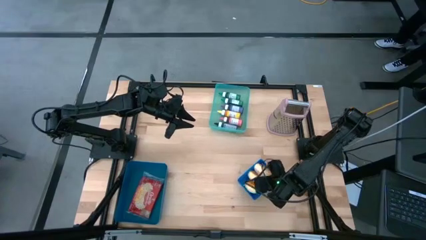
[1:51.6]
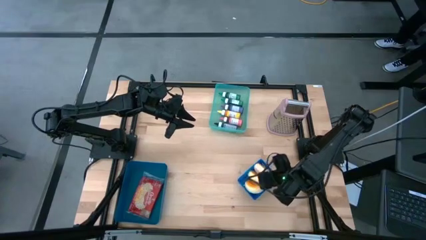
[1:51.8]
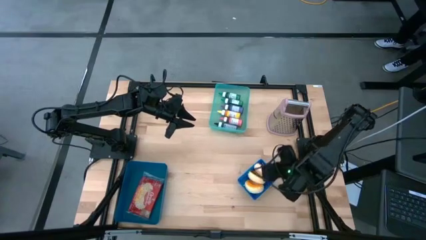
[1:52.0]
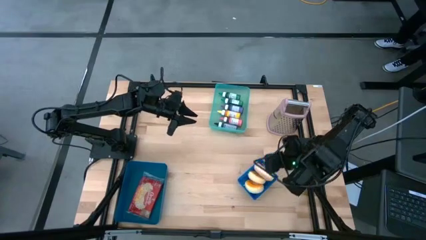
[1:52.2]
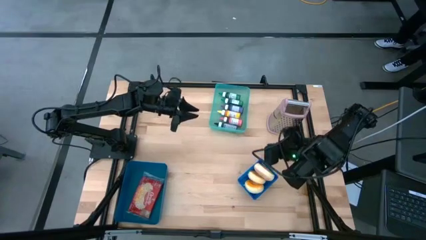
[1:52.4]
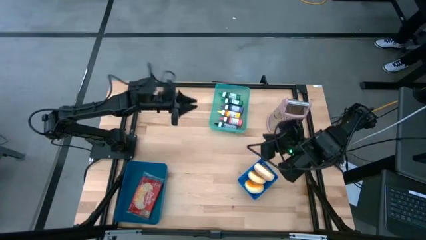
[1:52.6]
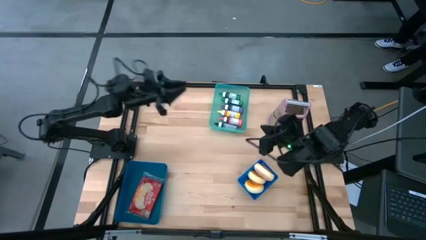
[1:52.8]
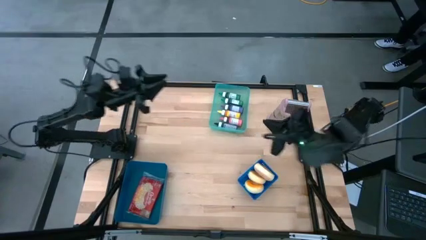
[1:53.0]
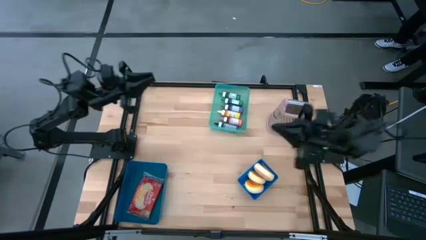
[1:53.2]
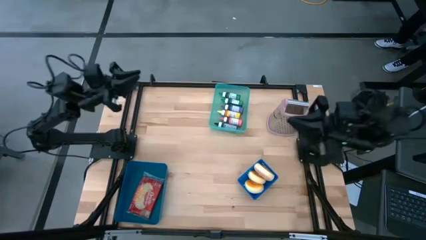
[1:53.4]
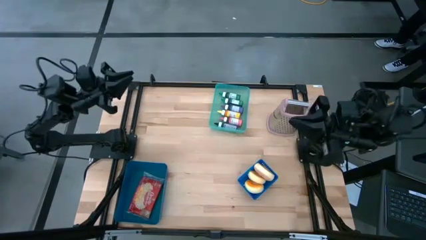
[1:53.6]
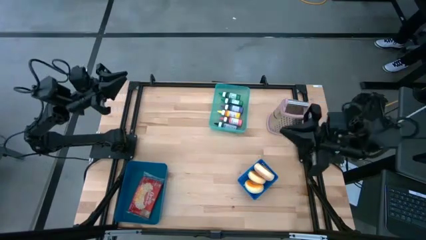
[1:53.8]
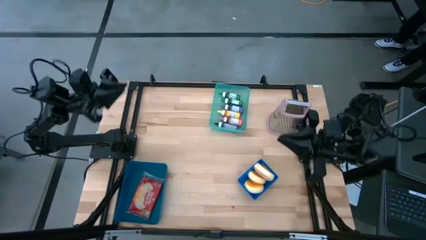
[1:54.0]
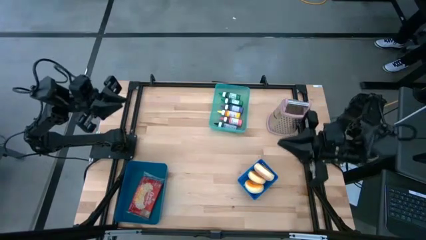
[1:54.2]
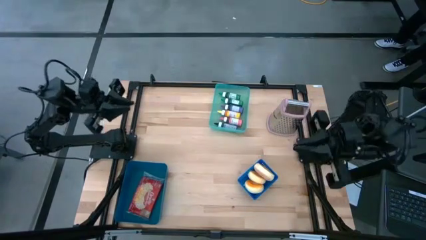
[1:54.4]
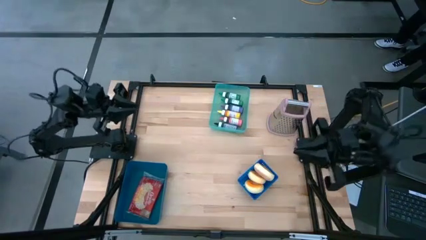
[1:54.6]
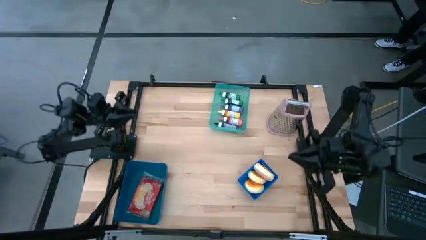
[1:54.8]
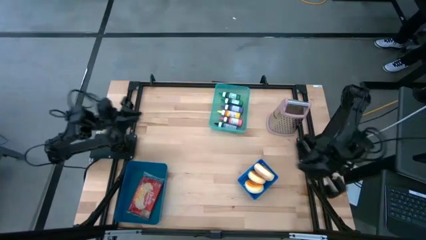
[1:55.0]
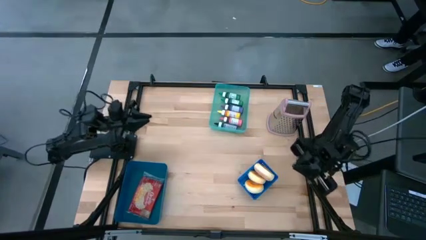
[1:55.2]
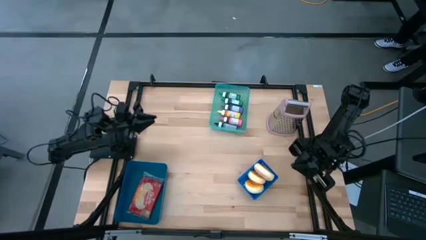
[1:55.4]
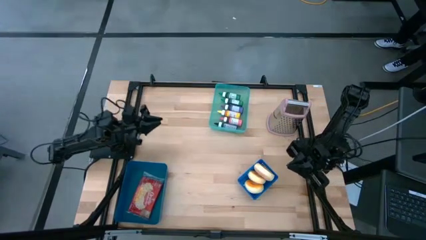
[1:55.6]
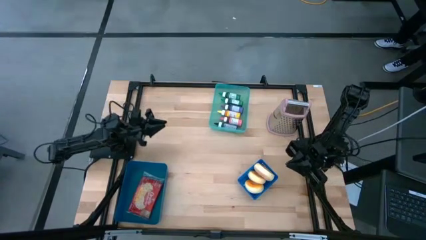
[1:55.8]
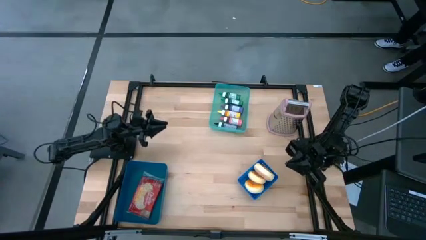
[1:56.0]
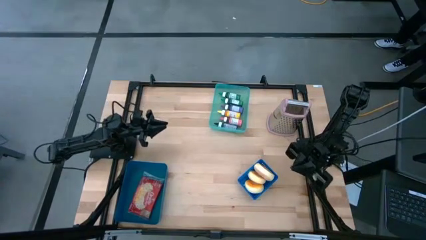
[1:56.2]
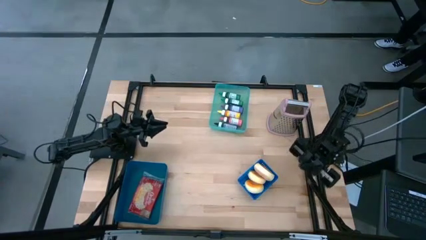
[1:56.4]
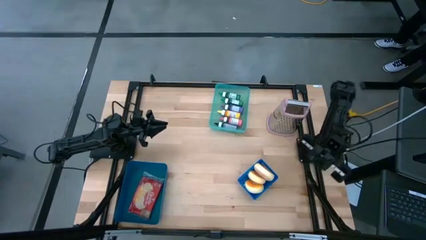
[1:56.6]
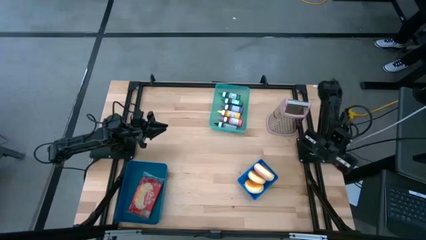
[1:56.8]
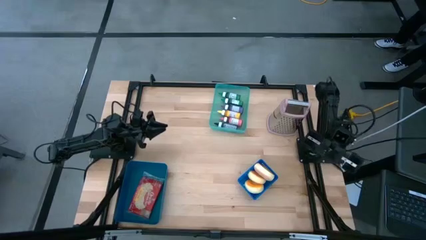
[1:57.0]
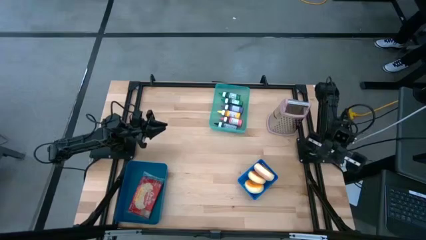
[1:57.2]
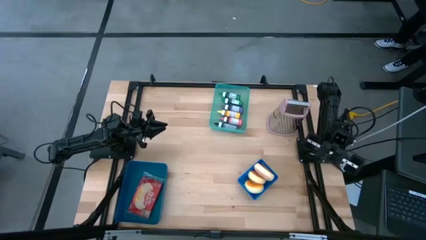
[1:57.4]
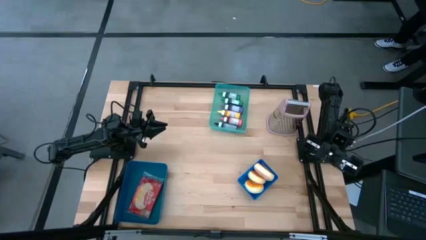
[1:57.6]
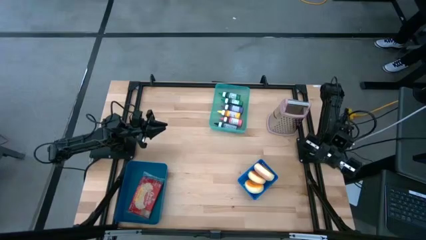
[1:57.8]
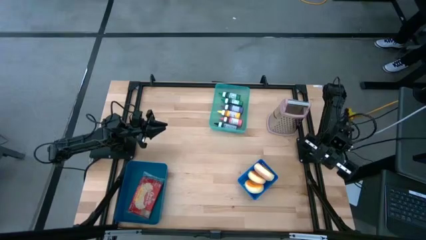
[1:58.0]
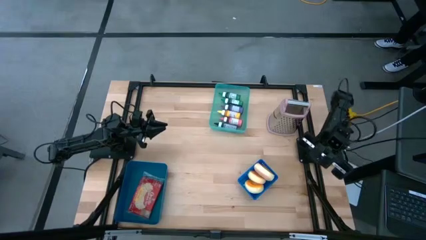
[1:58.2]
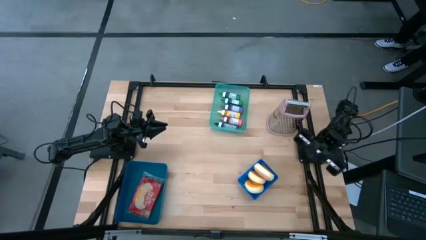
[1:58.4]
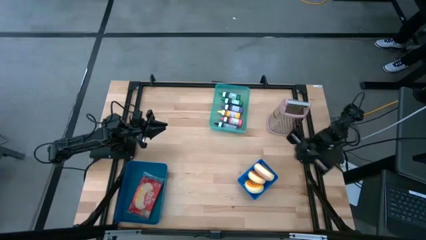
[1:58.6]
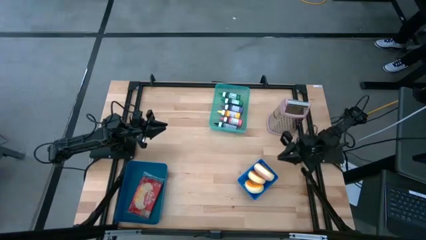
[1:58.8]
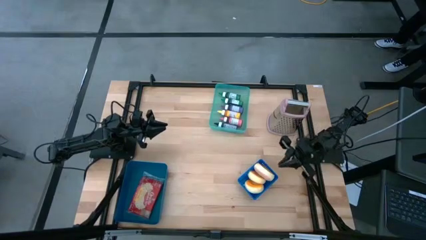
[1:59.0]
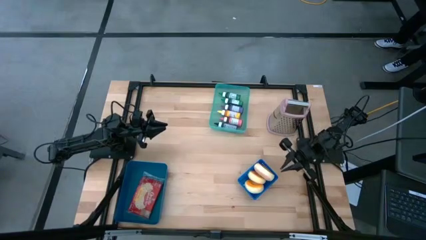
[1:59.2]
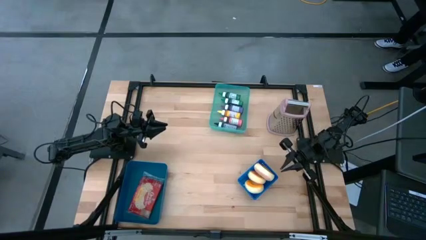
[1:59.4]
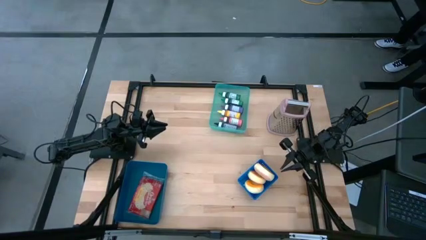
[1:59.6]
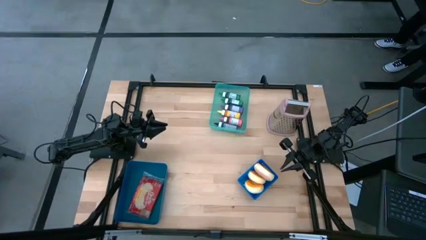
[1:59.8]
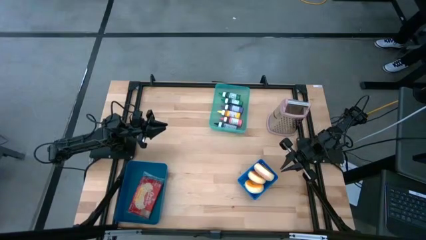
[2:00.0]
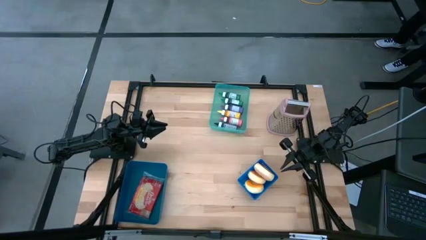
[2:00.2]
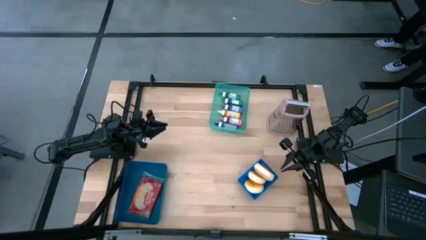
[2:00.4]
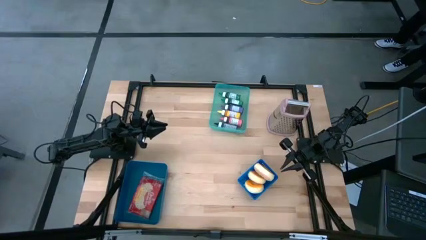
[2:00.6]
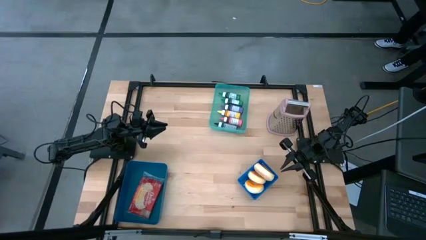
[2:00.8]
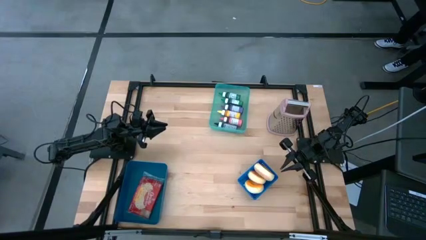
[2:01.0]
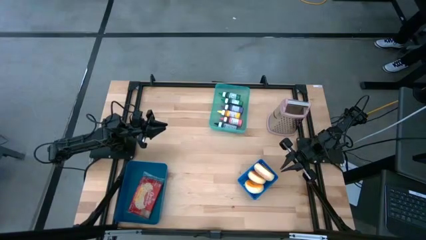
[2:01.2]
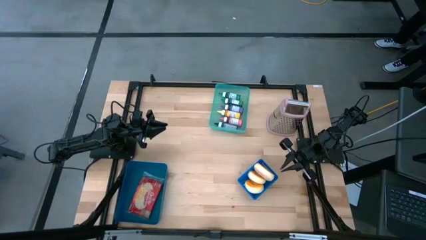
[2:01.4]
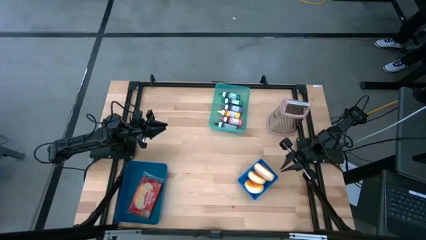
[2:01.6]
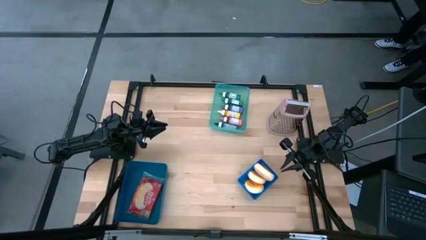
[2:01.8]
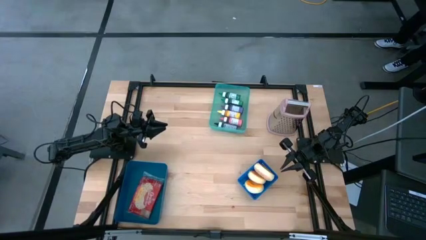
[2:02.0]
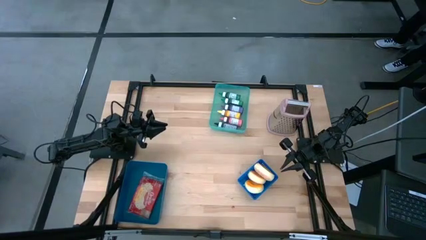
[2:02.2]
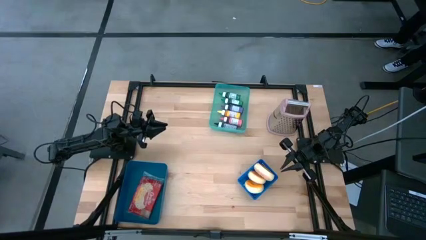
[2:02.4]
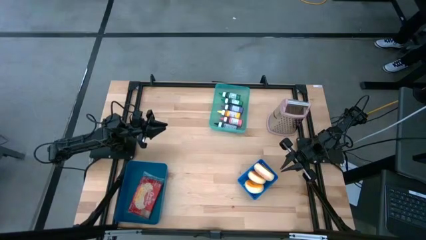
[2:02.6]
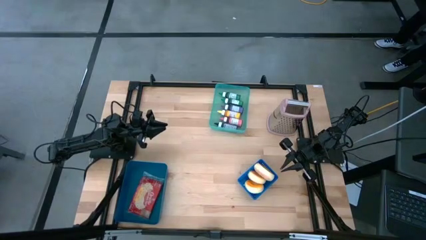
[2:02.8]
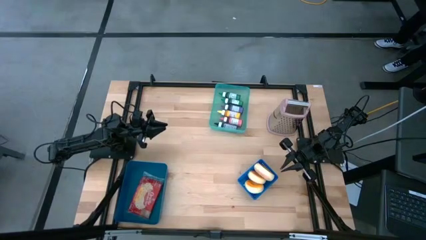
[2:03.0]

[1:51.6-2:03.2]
Return to Home Position
